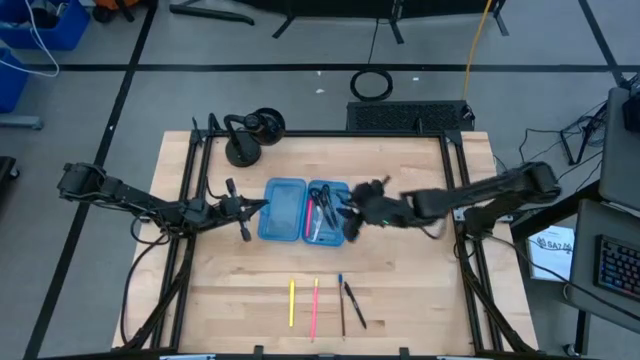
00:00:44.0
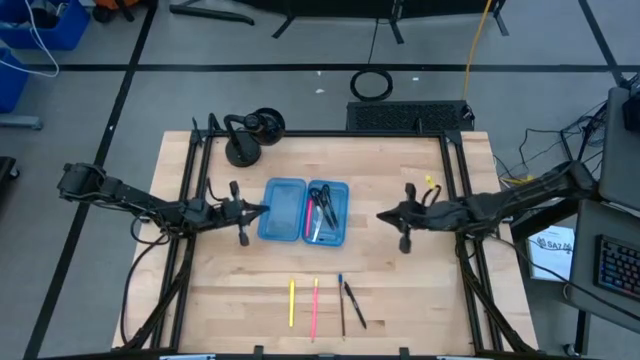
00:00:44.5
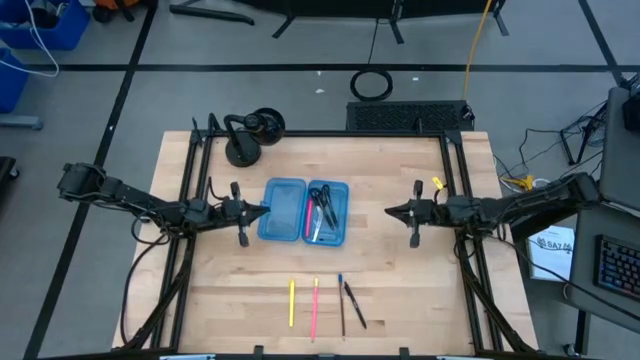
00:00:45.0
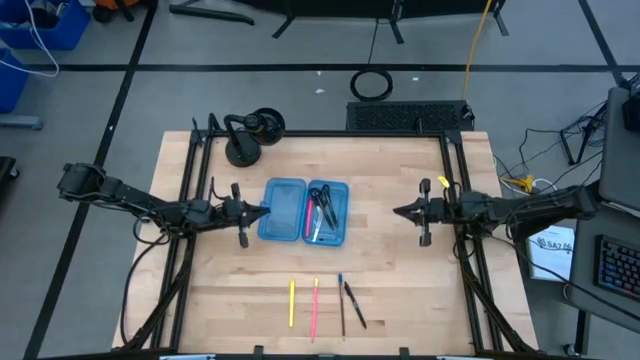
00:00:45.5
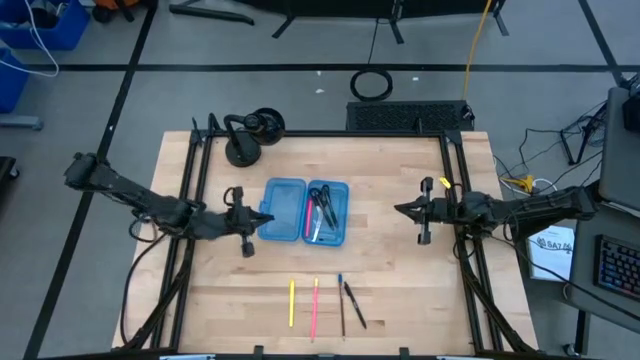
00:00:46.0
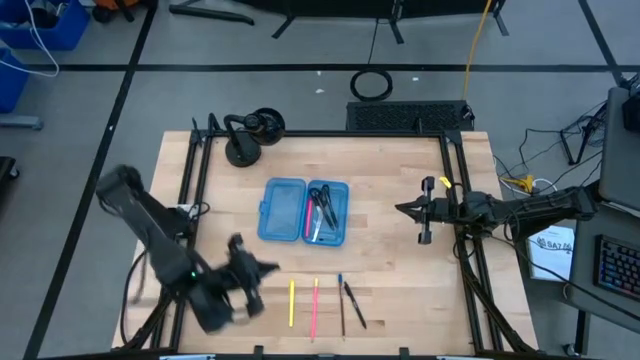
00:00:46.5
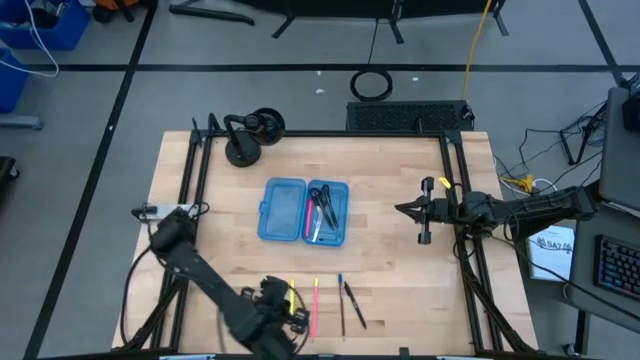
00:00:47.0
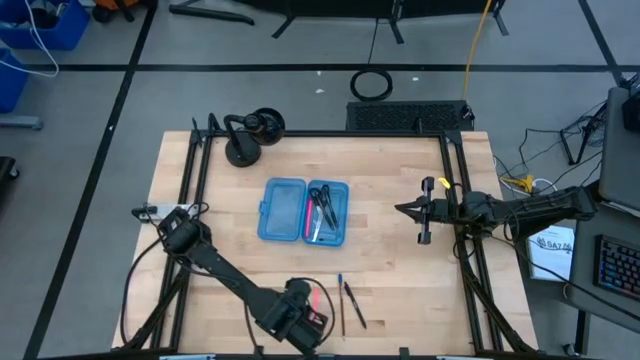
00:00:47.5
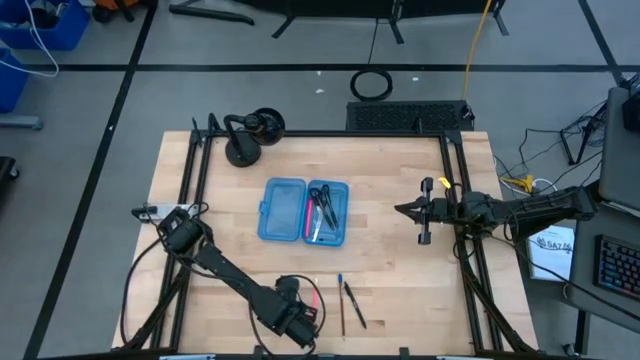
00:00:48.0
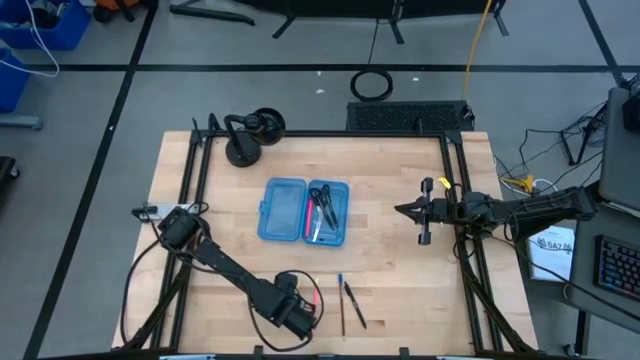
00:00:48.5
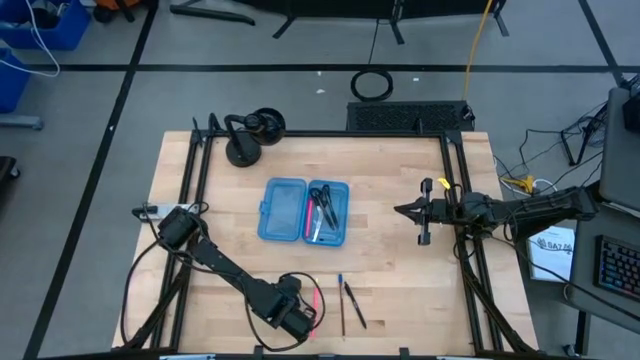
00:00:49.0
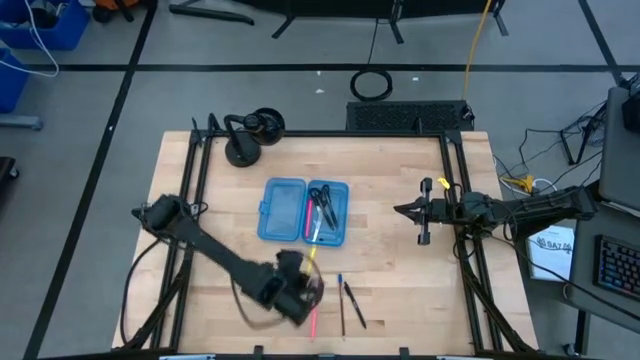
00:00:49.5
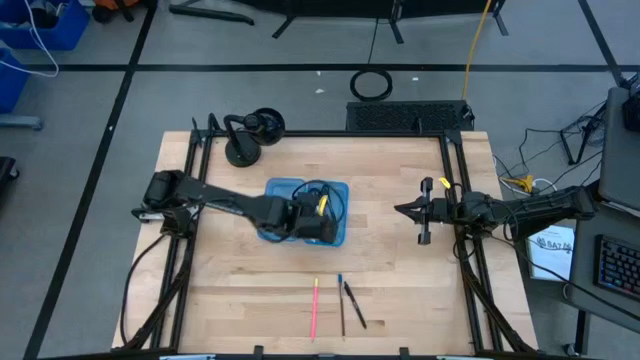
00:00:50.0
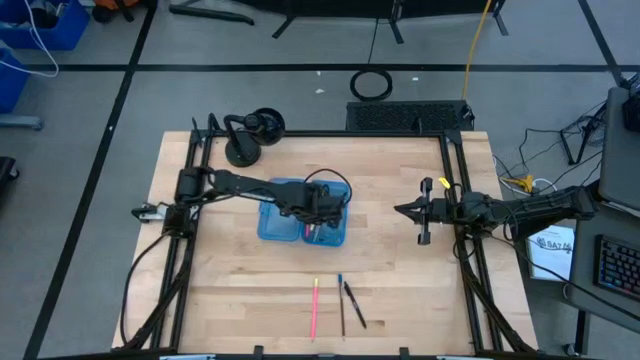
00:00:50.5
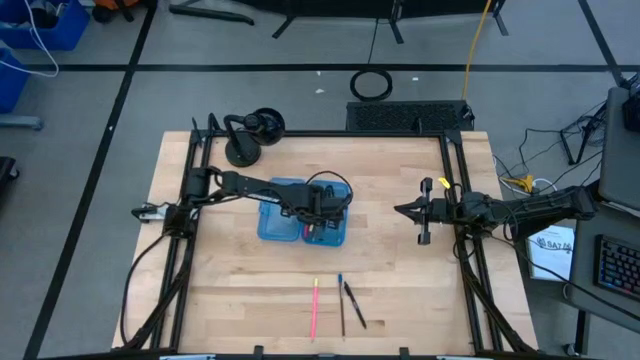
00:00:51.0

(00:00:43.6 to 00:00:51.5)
Task: Pick & place school supplies into a supply box
Put the yellow pen into the blue supply box

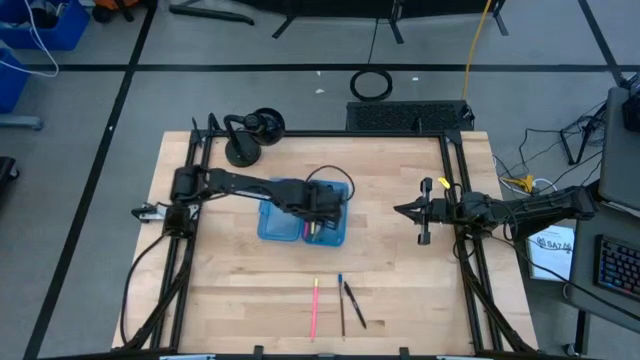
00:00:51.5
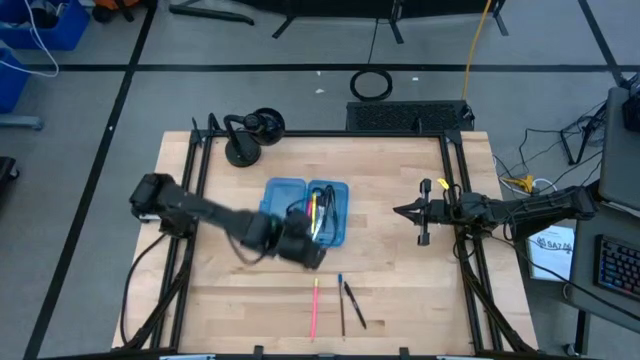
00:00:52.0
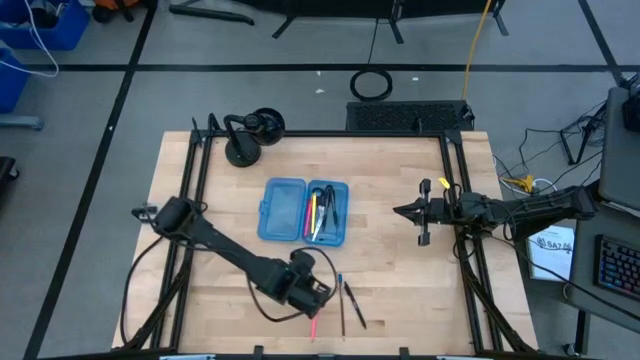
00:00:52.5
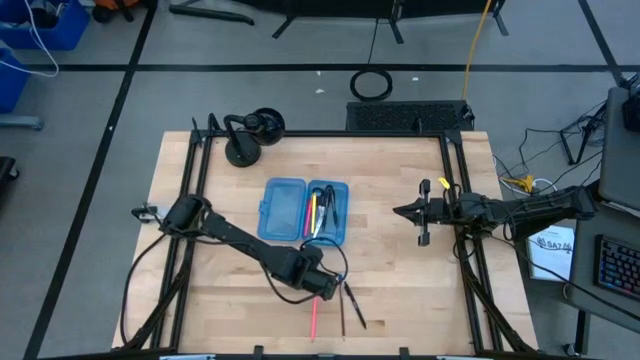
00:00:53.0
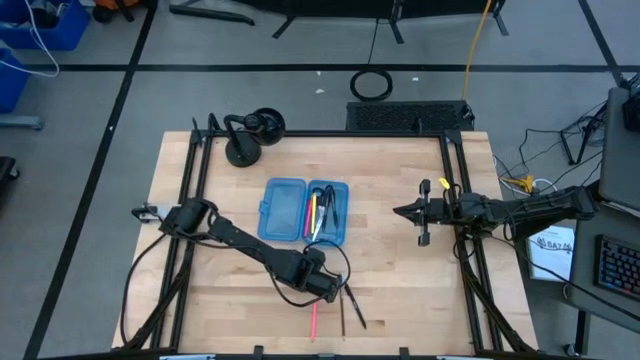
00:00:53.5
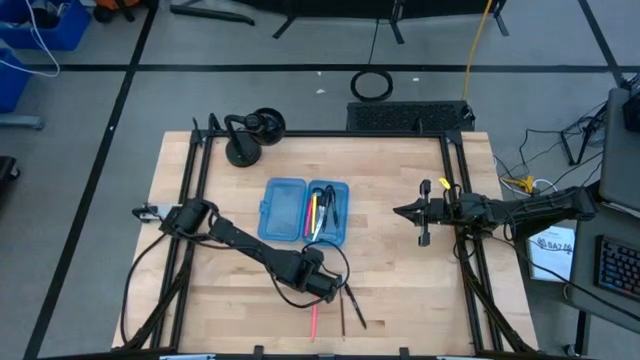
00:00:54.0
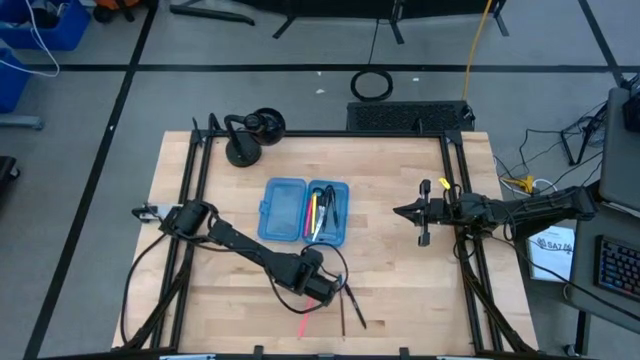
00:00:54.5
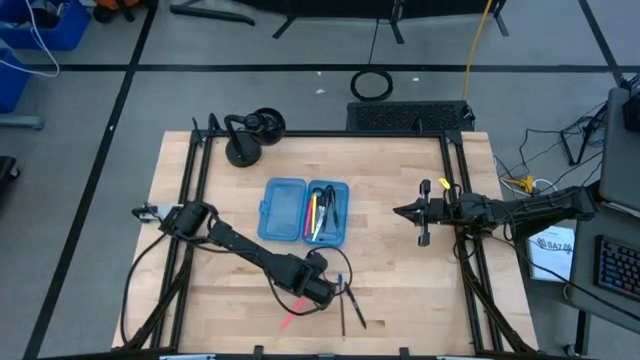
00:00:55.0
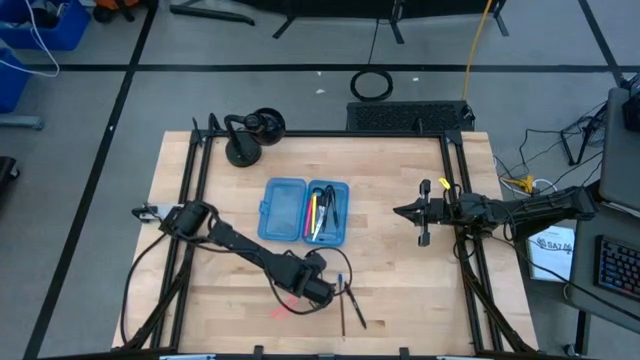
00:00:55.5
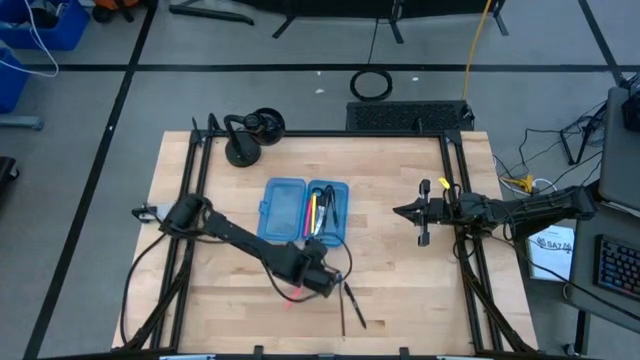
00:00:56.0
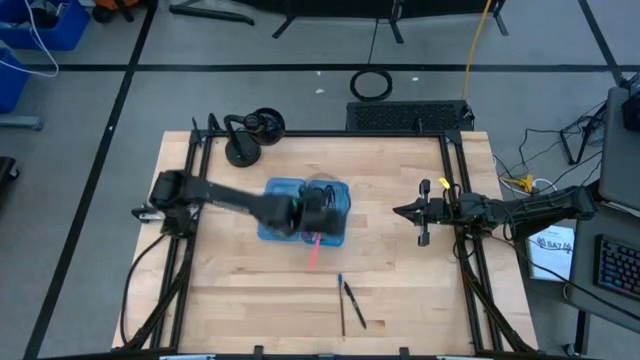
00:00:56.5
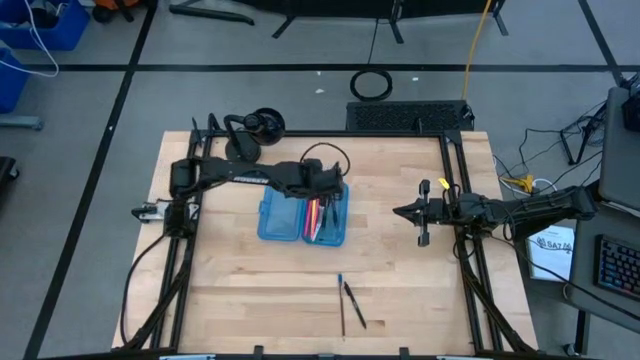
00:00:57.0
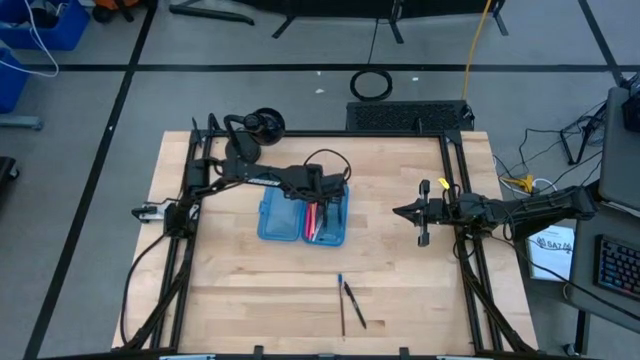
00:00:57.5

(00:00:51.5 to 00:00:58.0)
Put the pink pencil into the blue supply box

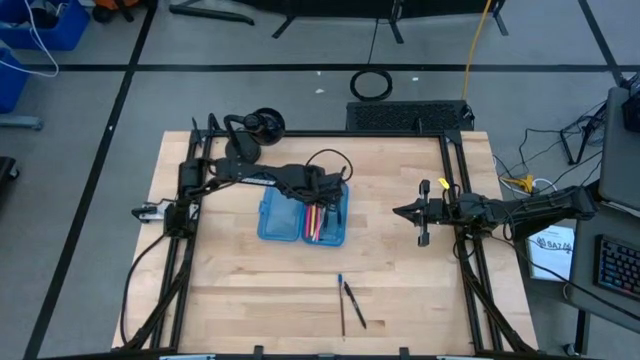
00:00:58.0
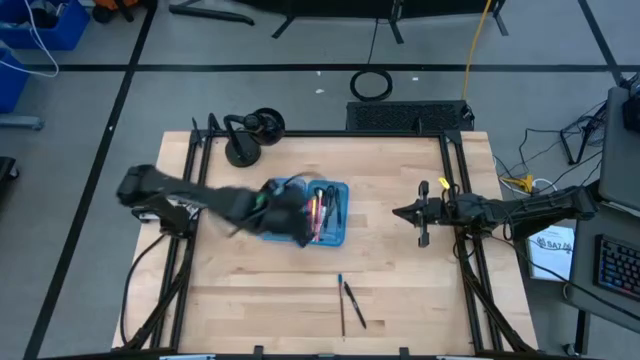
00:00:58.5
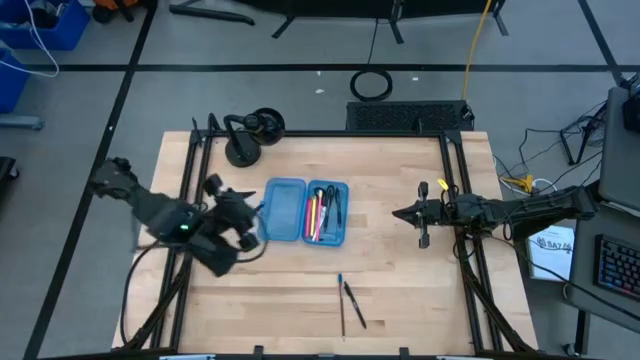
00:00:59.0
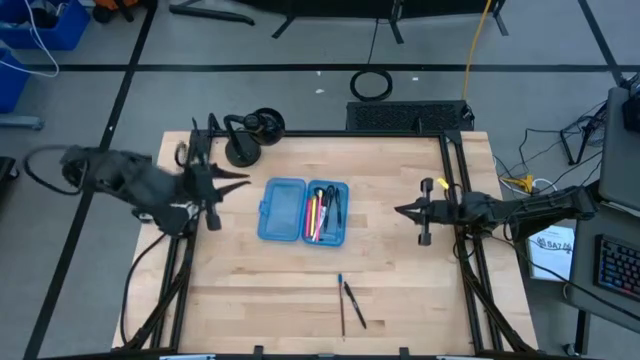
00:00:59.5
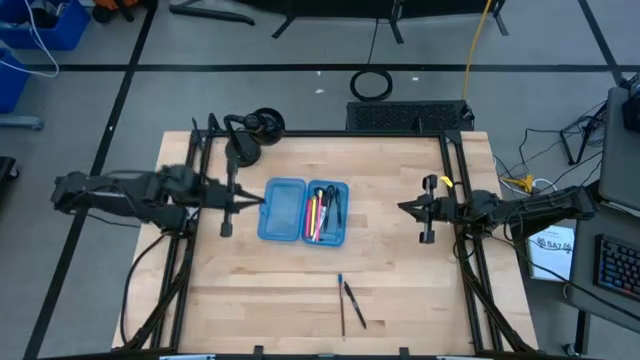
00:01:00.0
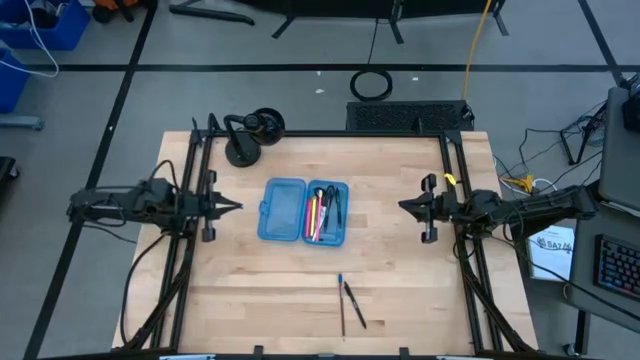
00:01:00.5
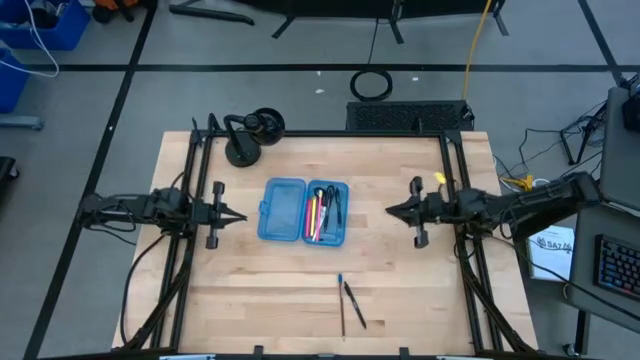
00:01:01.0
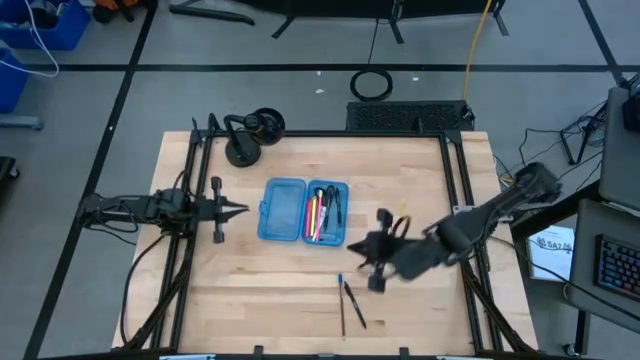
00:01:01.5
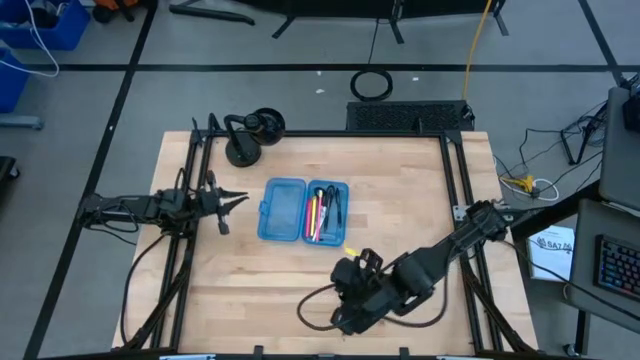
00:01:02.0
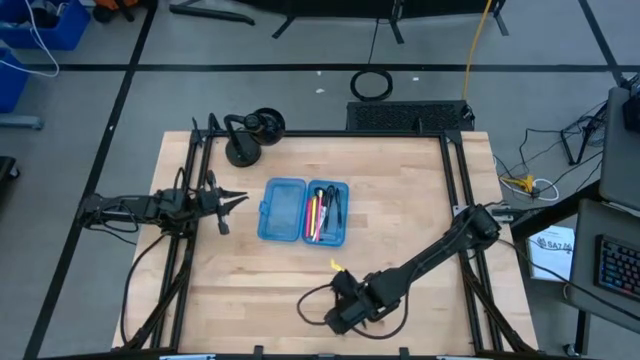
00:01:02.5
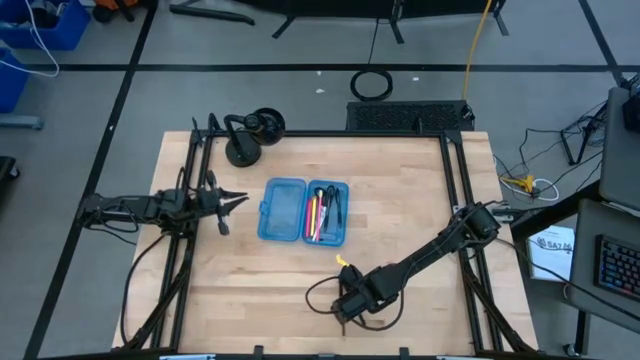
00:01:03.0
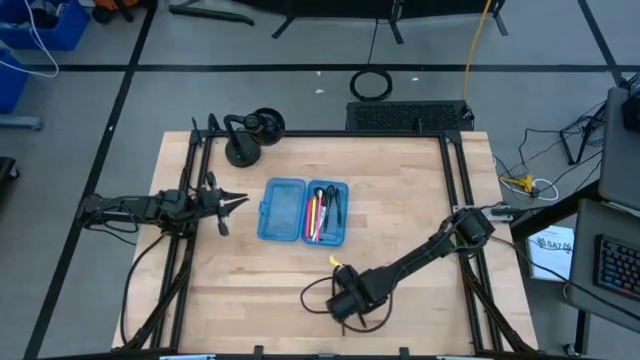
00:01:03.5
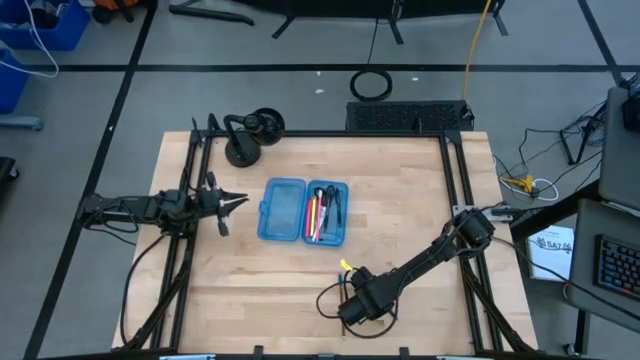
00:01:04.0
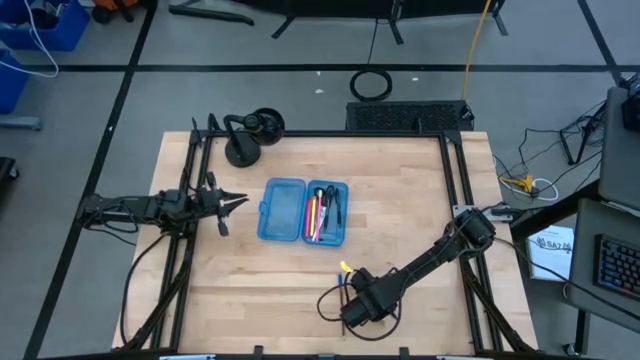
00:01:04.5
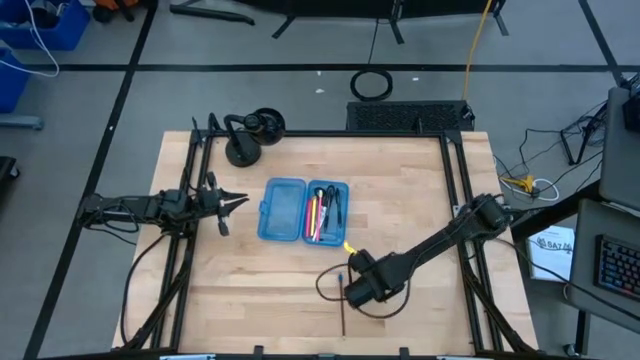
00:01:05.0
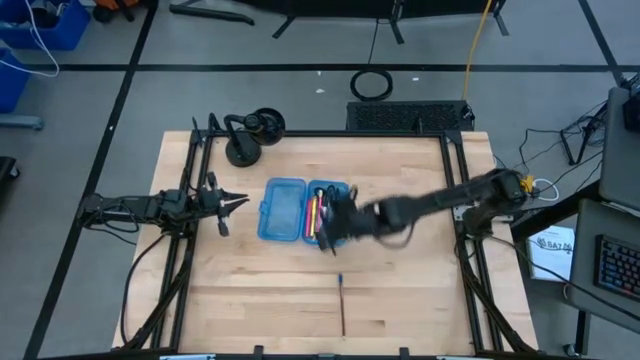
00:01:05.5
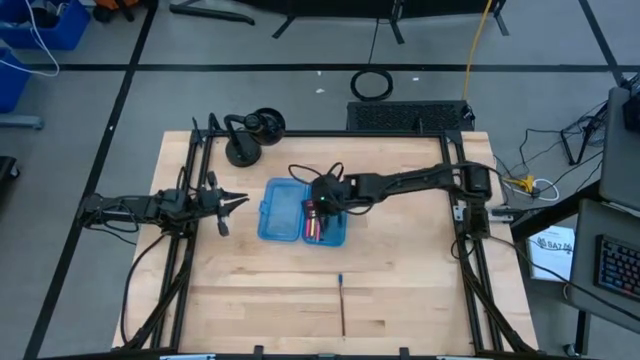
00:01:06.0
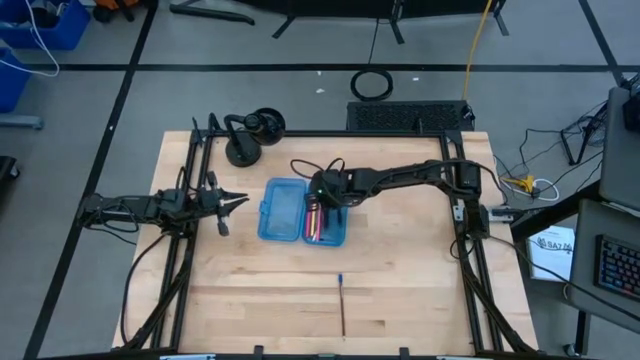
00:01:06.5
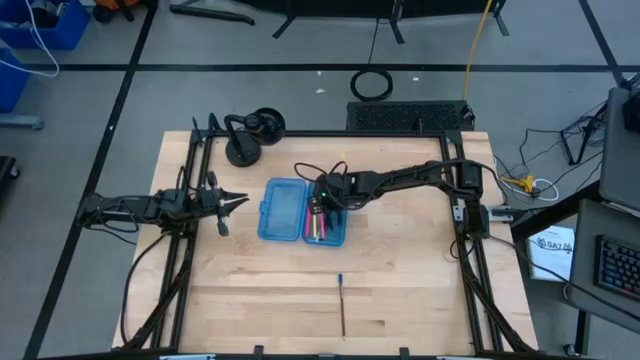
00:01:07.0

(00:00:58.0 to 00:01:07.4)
Put the black pen into the blue supply box
